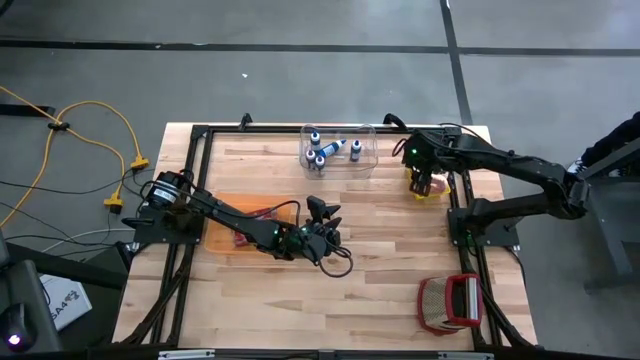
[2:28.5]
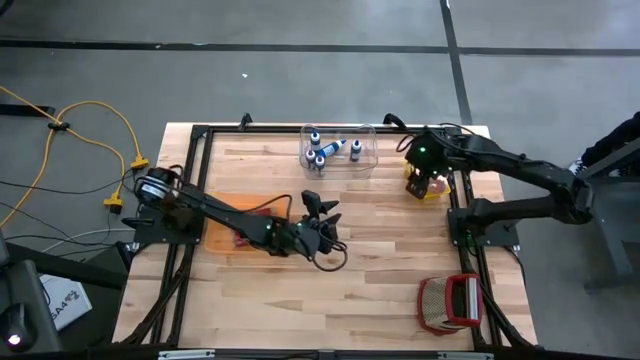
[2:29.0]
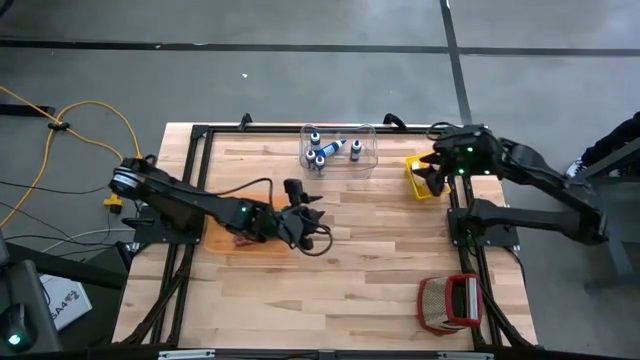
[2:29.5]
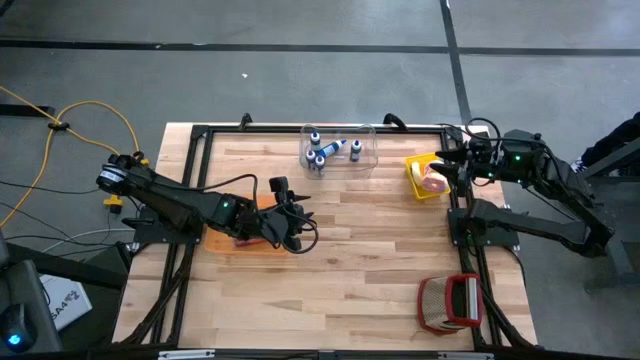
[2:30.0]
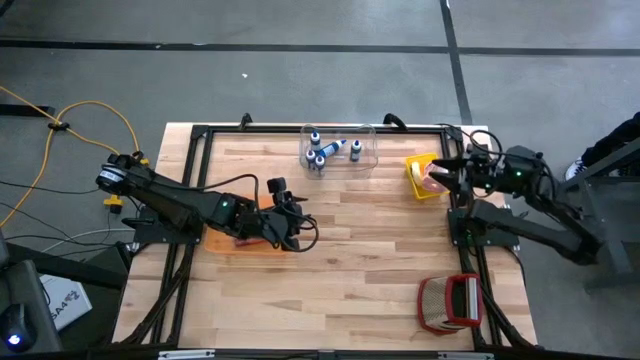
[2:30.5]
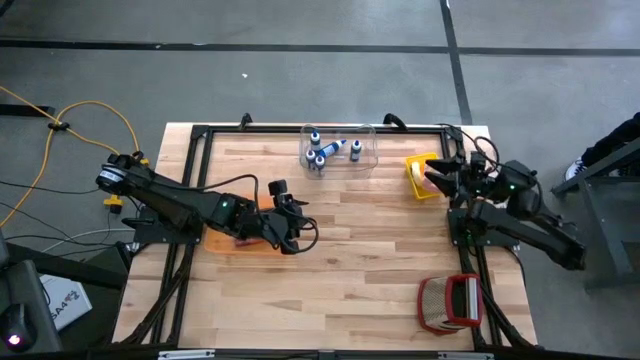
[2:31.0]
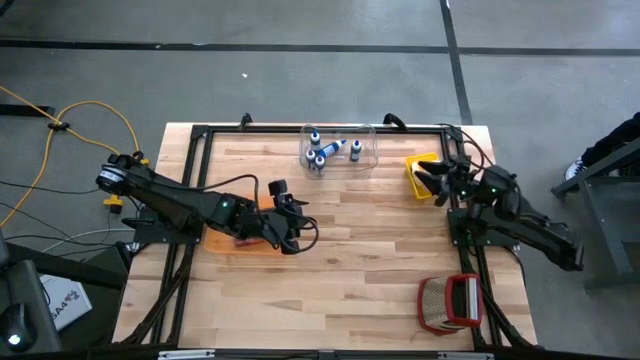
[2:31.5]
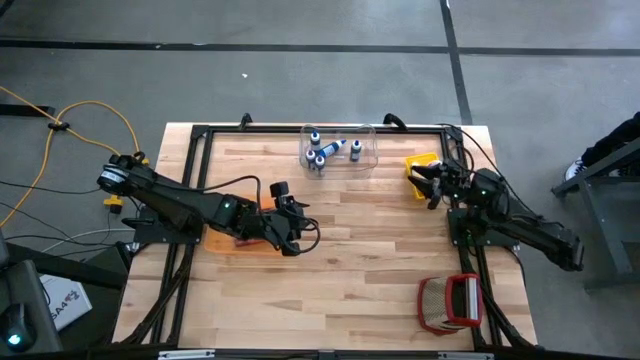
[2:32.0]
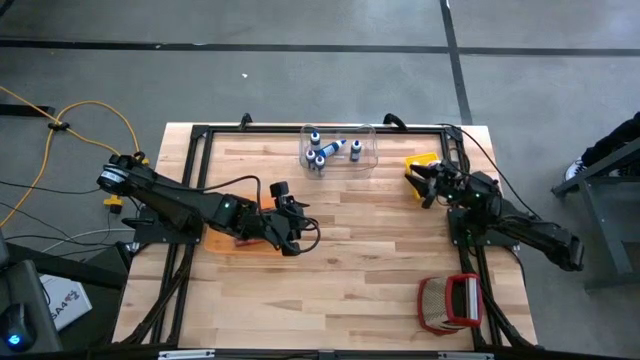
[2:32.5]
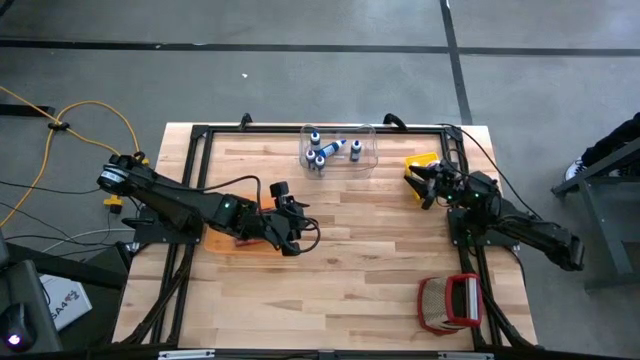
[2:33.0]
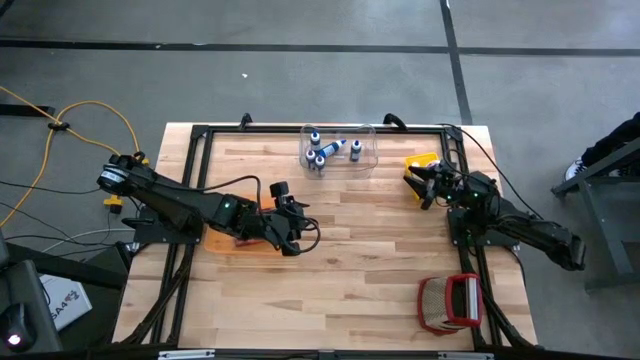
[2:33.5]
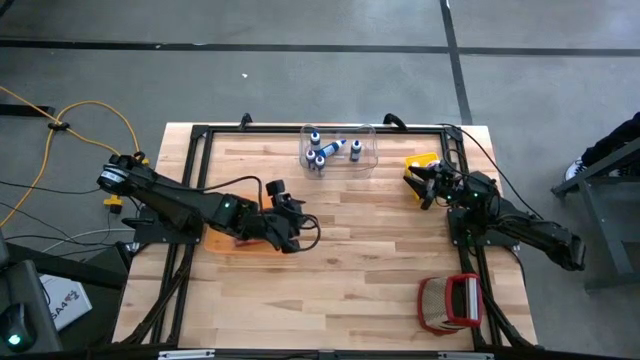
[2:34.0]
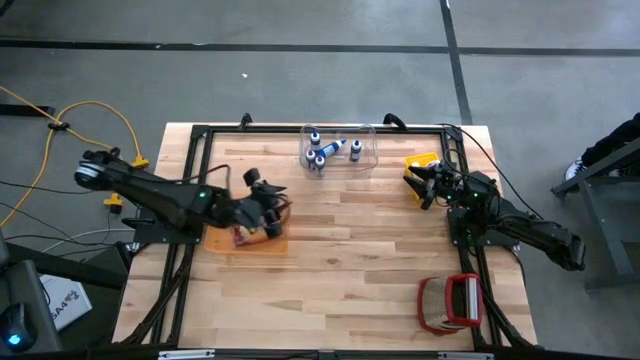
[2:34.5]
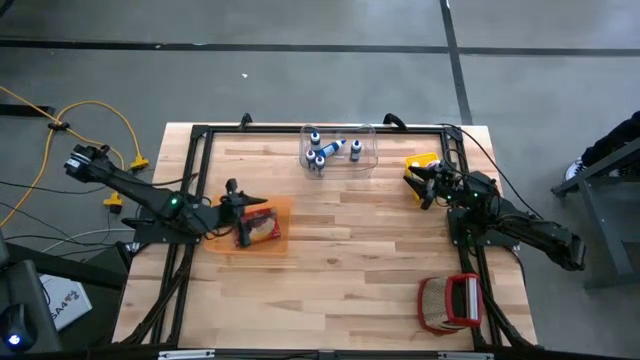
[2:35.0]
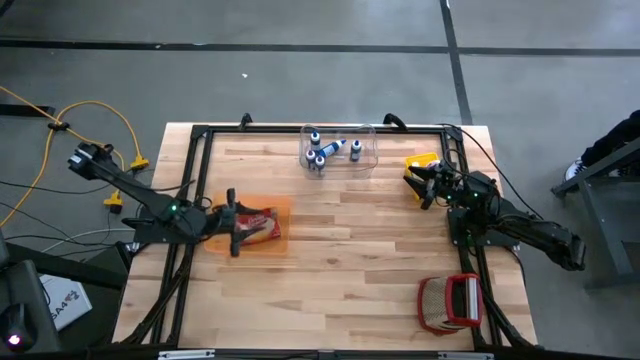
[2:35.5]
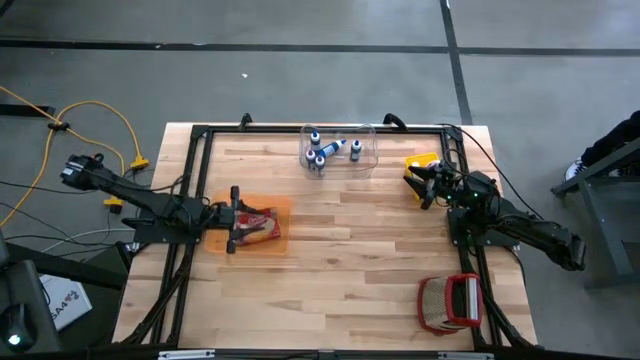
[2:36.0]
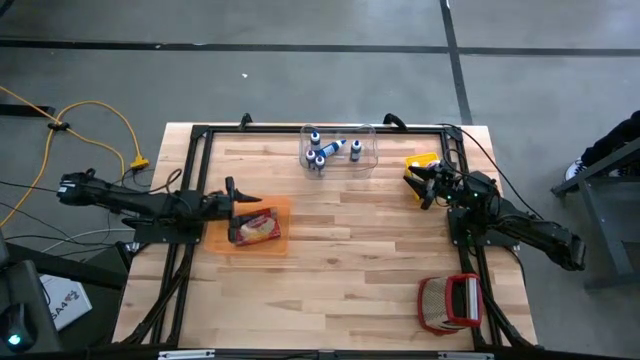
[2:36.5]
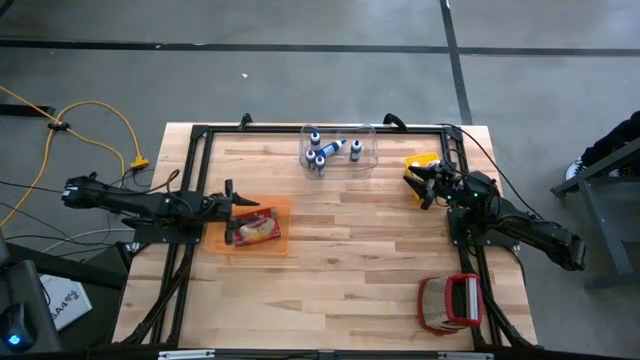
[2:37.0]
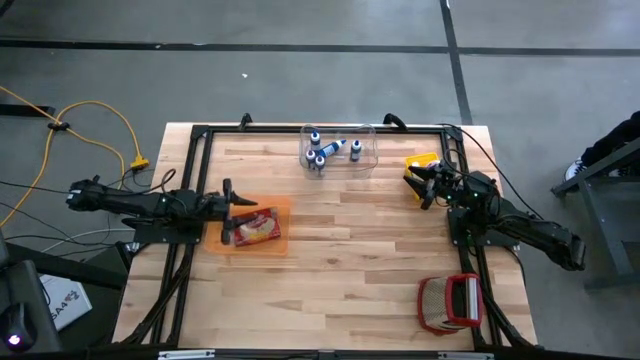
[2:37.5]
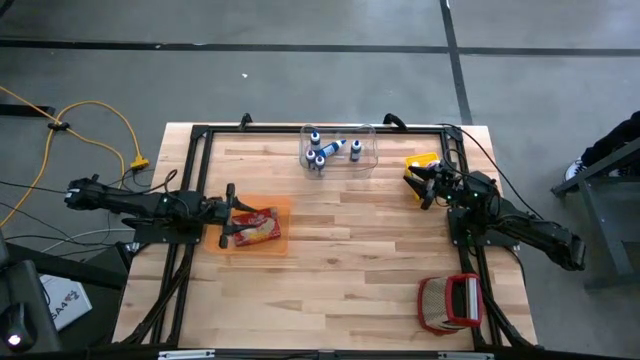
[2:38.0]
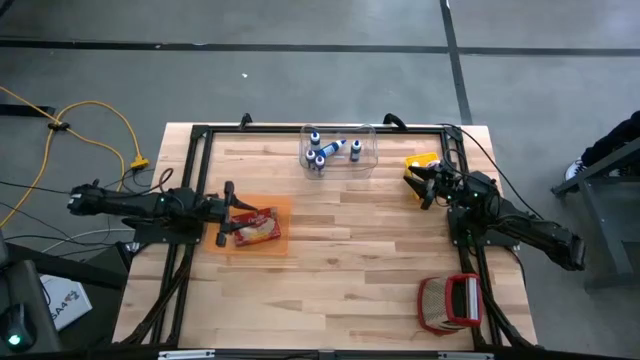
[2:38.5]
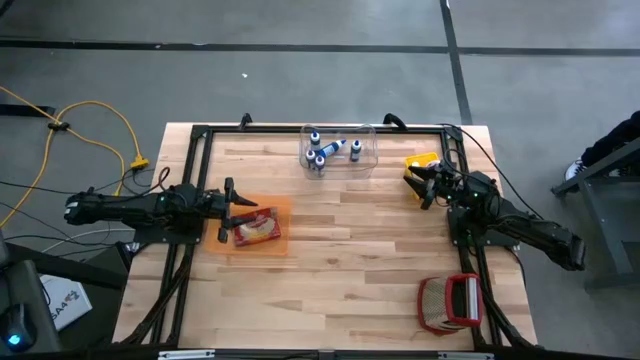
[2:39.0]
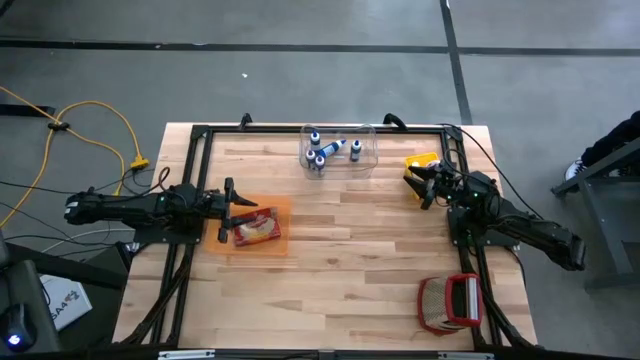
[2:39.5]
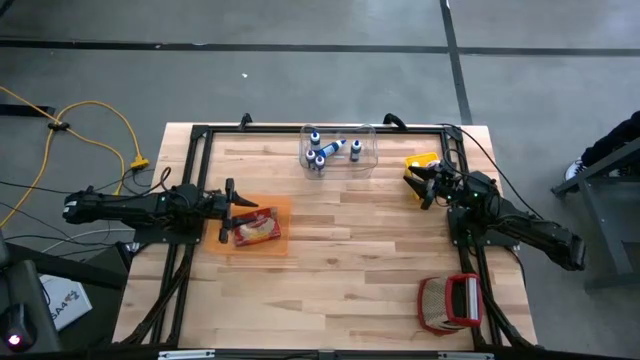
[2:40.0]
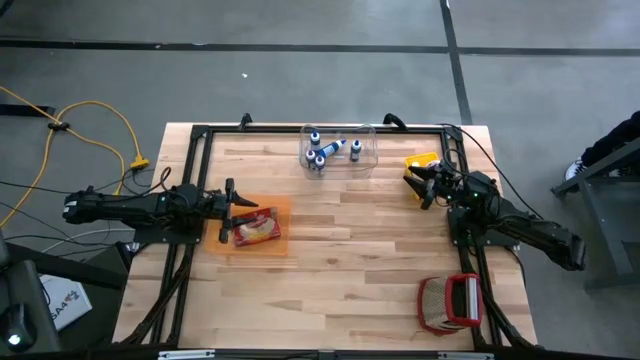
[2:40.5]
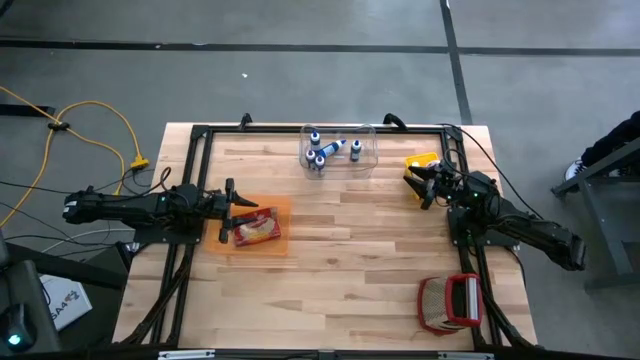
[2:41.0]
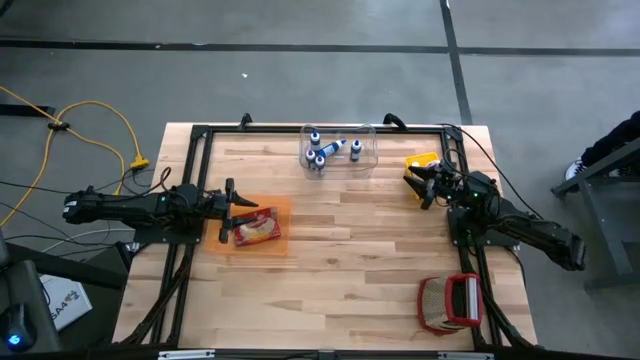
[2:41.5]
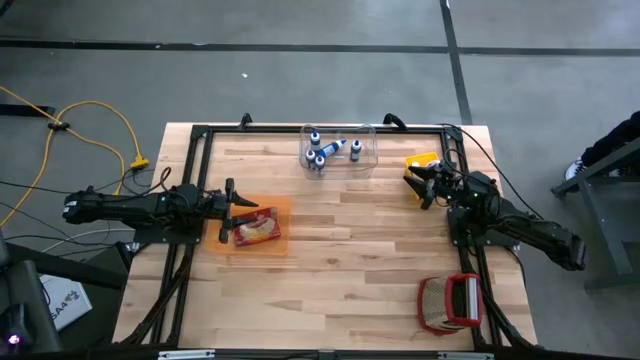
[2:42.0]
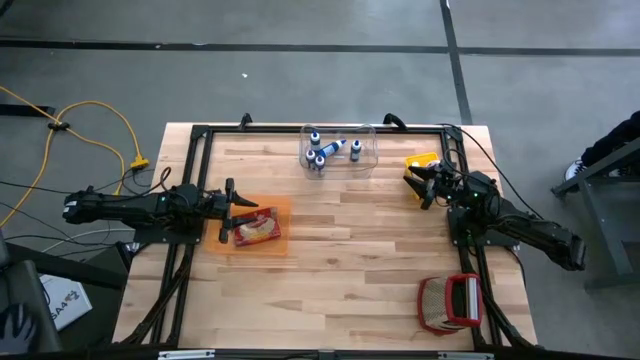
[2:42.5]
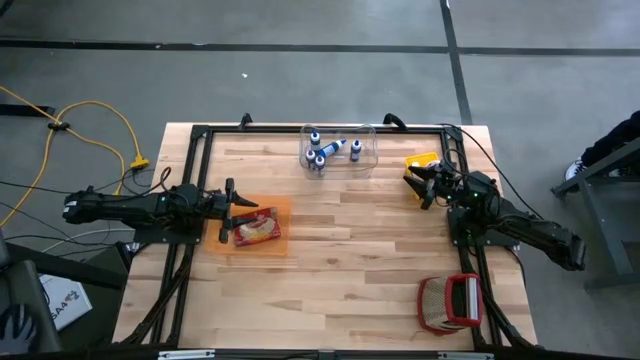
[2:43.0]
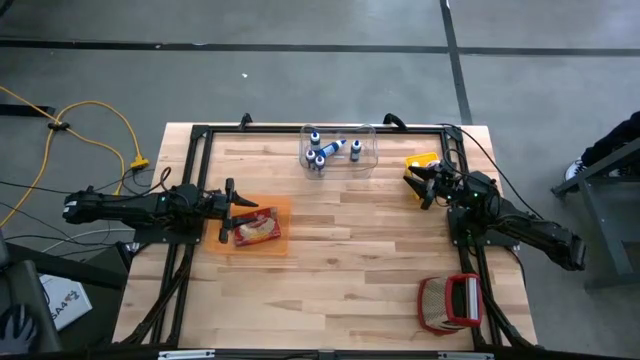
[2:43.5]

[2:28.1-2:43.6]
Return to Home Position

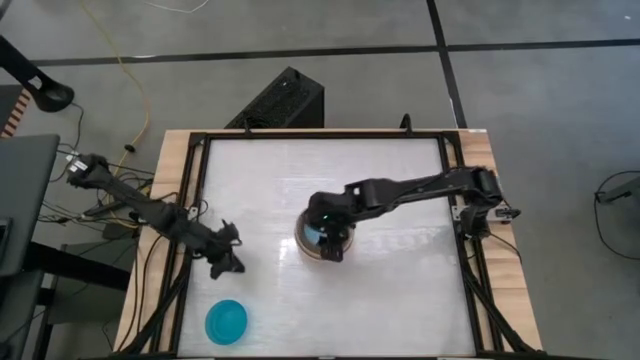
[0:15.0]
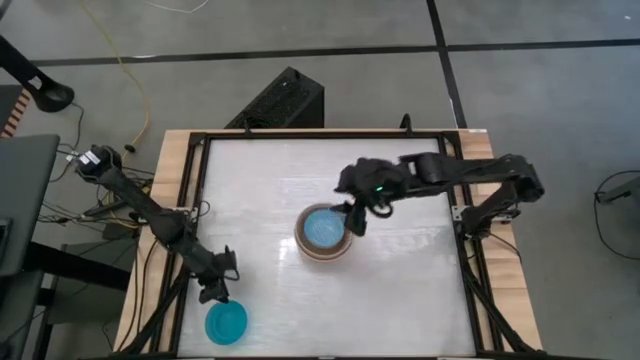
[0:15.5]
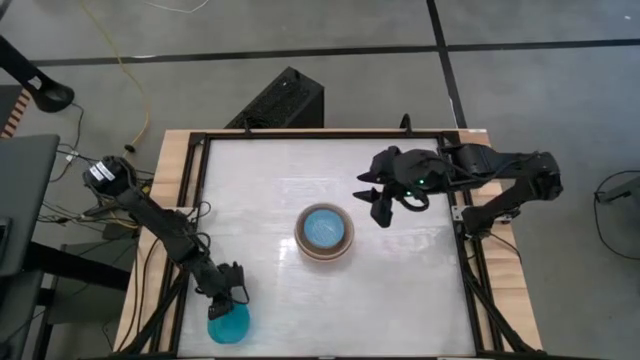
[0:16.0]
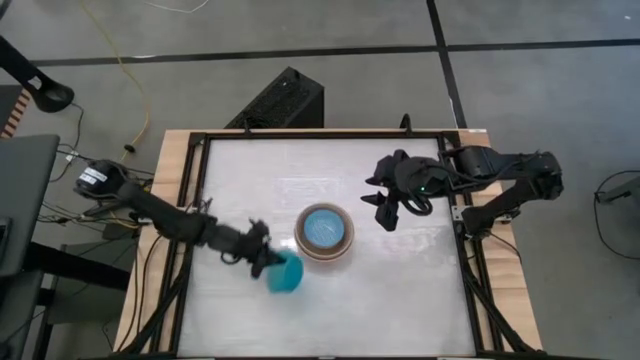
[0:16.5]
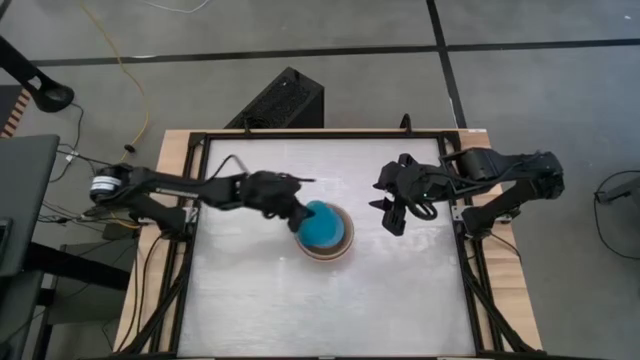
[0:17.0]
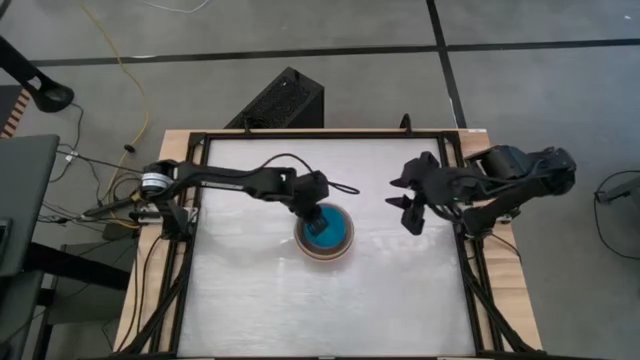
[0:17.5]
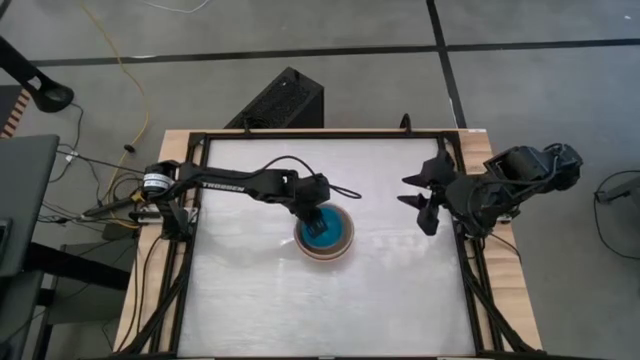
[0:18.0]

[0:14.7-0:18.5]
Stack the blue bowl on top of the orange bowl

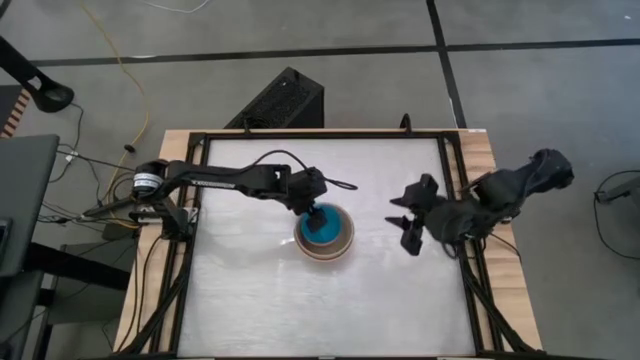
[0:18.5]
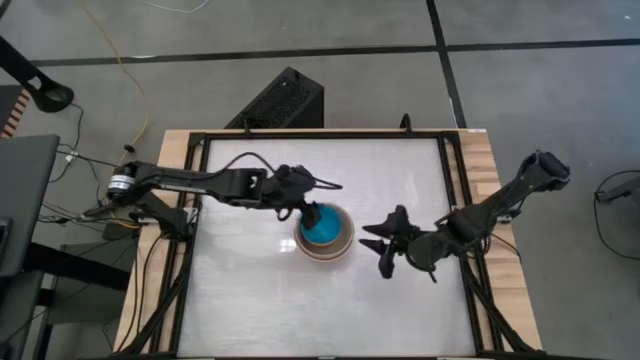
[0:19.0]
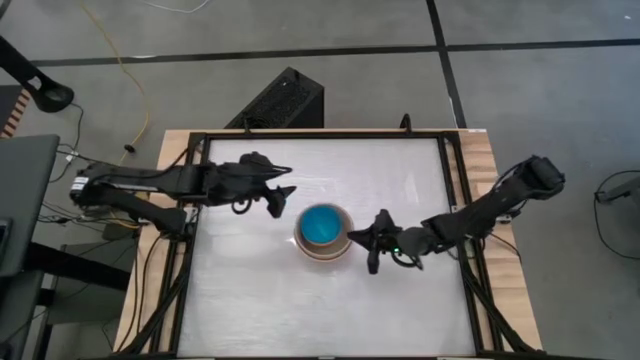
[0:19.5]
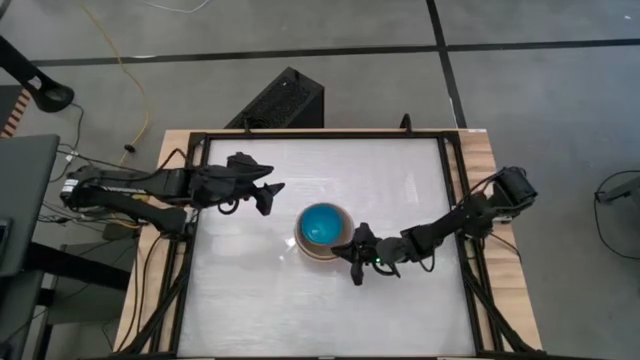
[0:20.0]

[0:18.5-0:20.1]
Adjust the gray bowl
